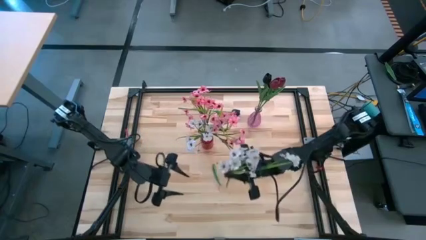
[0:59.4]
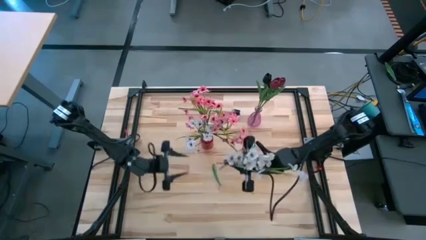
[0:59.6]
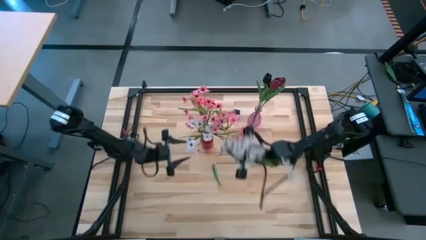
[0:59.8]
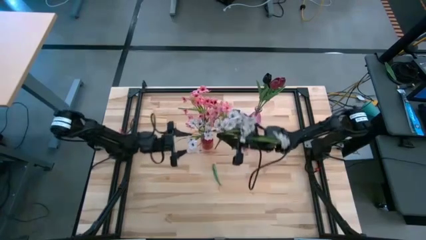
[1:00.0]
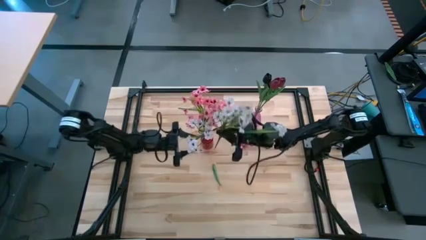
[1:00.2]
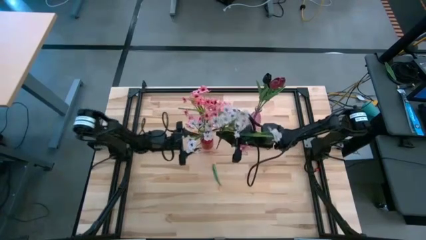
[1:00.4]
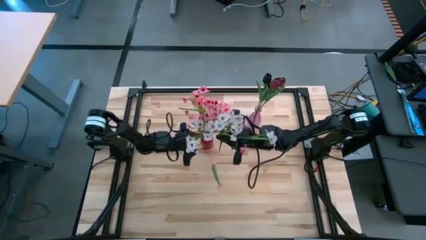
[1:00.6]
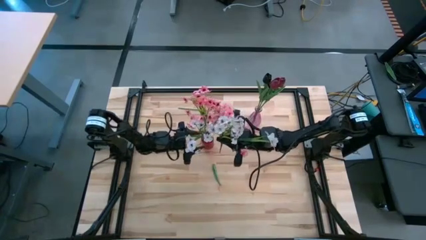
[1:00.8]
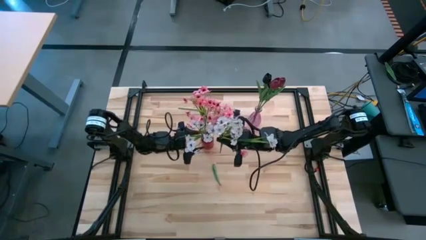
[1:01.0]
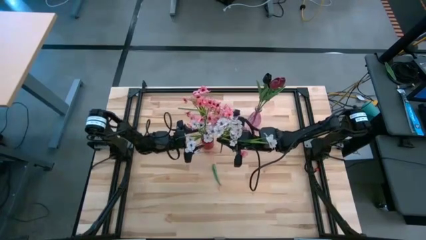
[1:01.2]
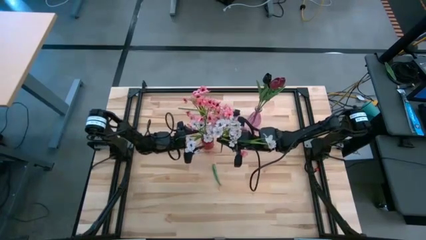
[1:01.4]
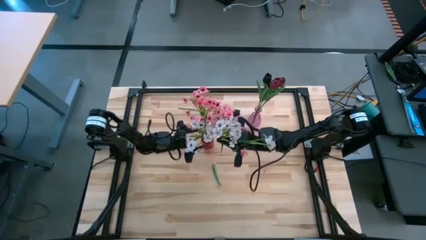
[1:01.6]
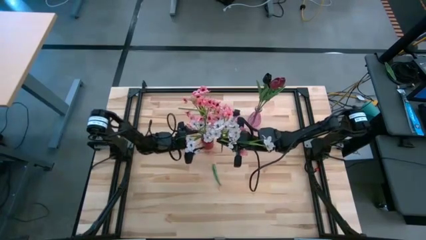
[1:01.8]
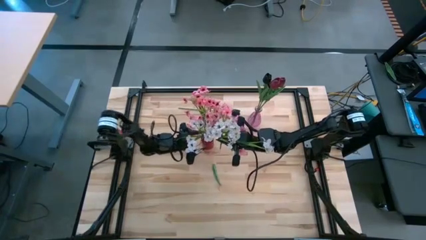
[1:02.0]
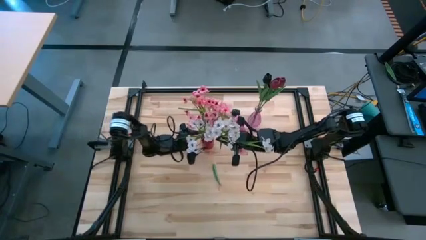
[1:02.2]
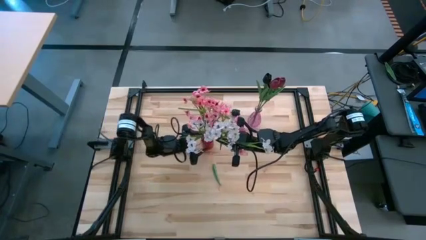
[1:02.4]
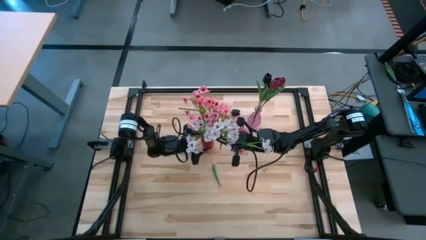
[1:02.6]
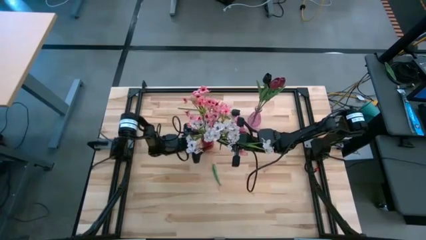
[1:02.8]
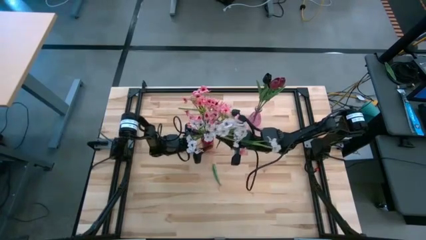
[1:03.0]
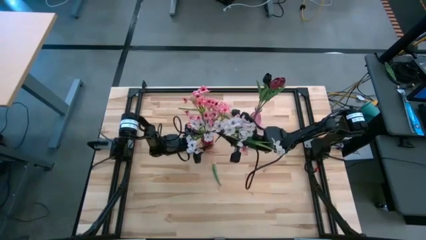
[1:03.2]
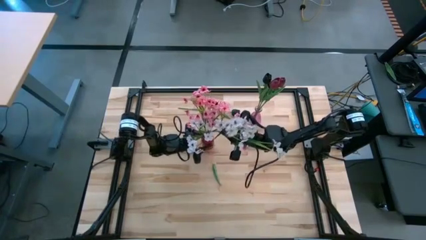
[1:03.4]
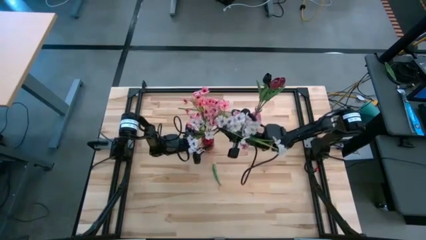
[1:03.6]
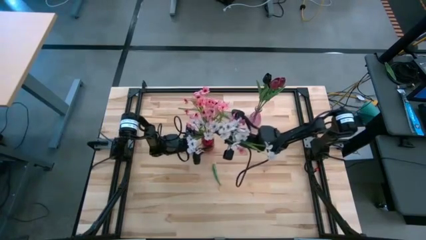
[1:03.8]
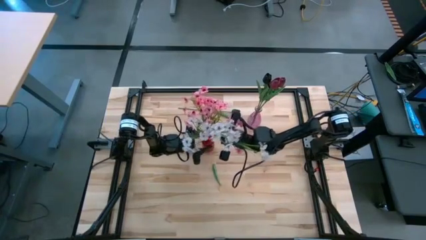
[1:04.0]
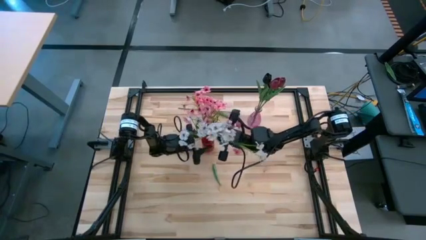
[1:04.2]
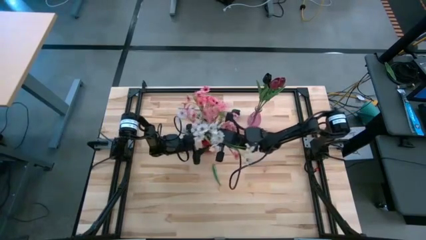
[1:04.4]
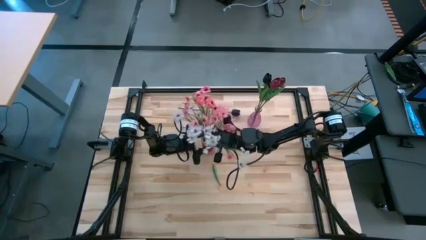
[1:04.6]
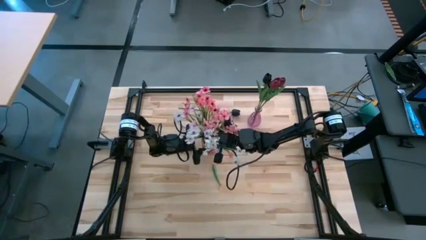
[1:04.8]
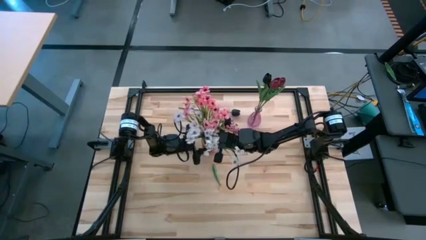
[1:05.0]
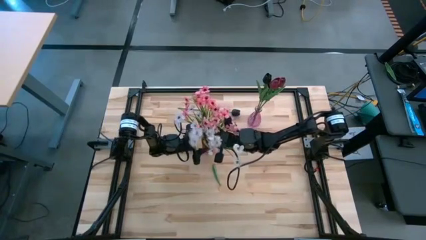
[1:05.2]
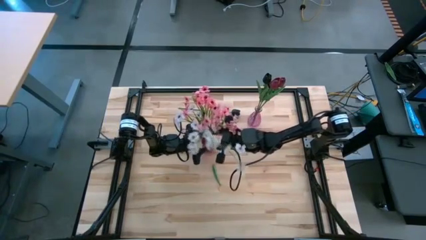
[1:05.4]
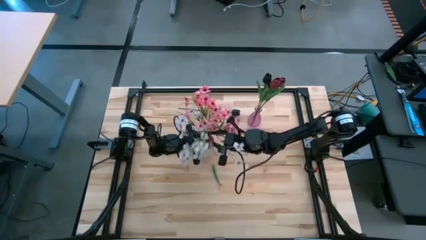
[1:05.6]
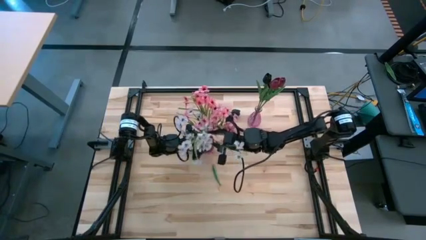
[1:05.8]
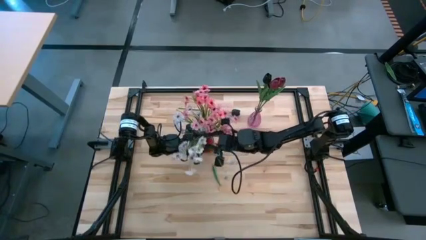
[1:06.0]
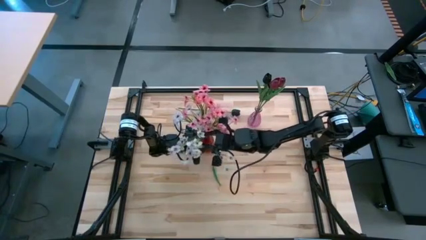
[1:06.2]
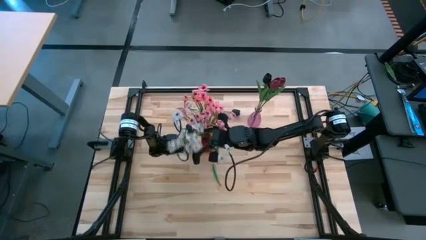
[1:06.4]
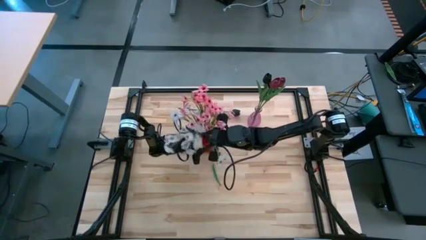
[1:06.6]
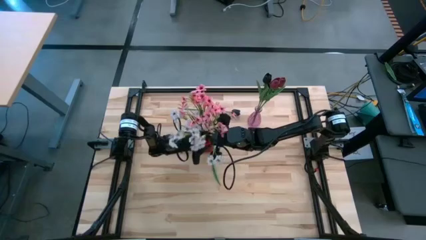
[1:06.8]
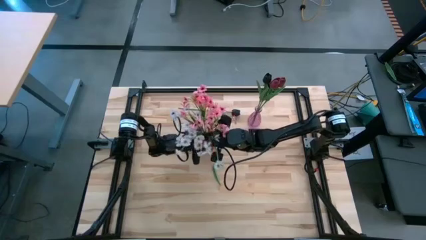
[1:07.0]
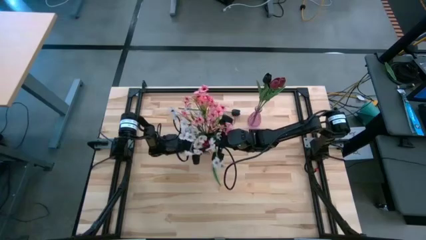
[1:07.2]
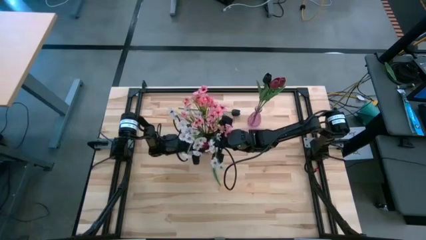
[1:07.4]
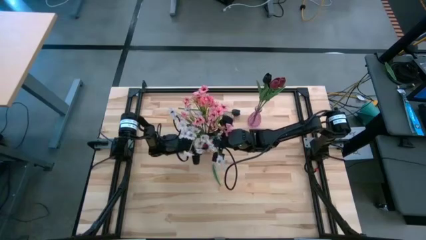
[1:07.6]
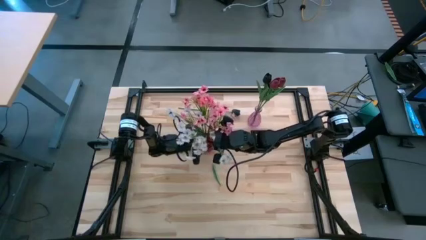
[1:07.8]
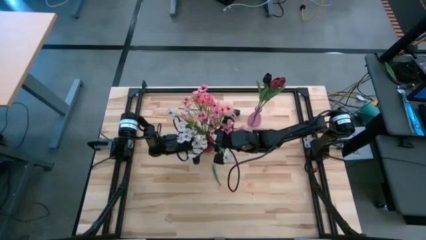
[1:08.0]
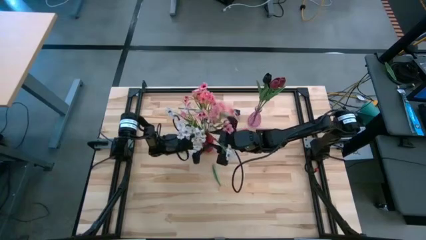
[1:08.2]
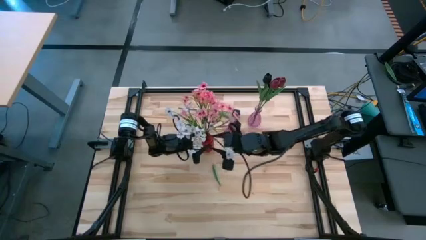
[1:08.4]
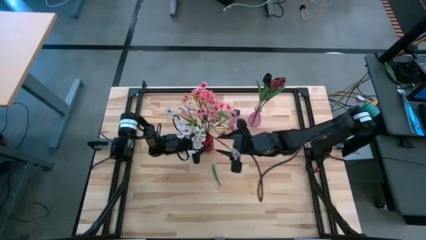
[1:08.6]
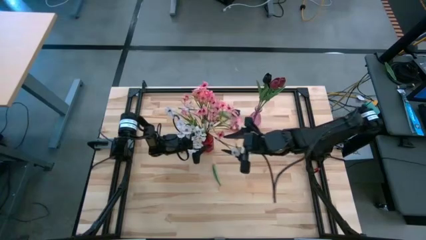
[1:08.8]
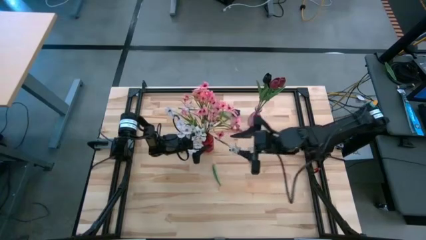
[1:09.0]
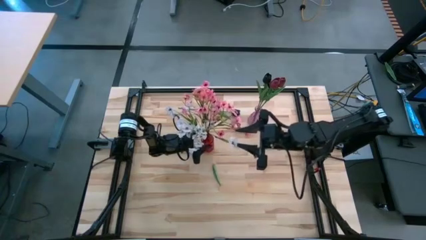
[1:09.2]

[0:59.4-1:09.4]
Task: Sort flowers into vase by color
Put the white flowers into the red vase

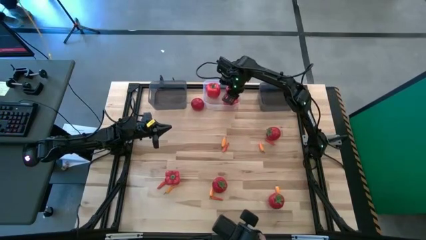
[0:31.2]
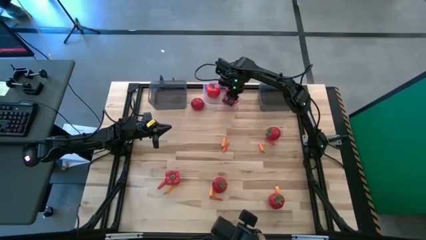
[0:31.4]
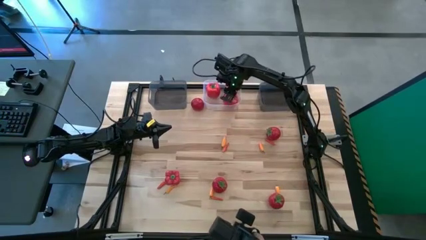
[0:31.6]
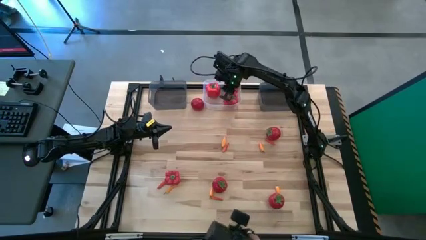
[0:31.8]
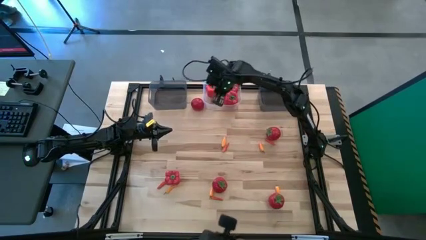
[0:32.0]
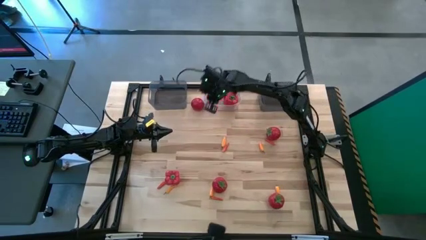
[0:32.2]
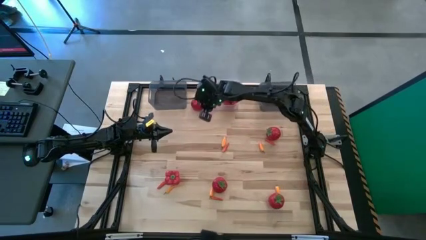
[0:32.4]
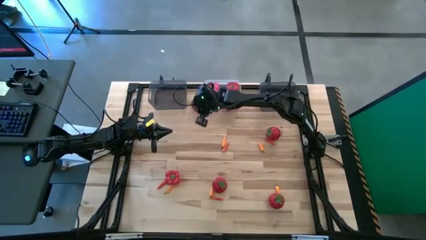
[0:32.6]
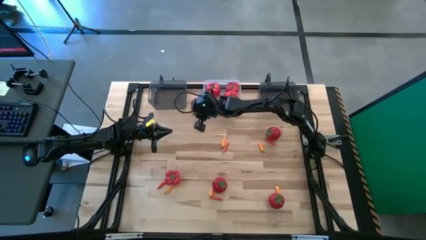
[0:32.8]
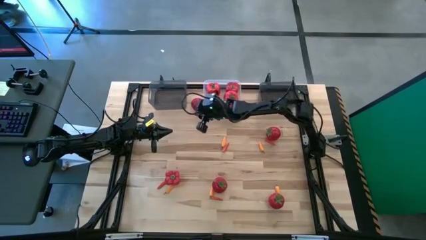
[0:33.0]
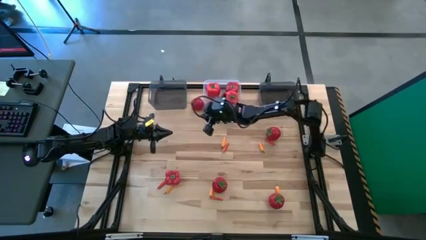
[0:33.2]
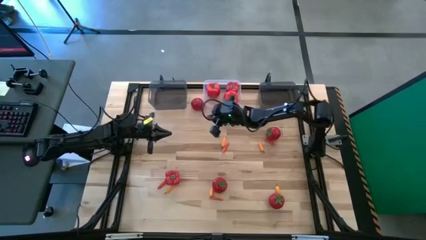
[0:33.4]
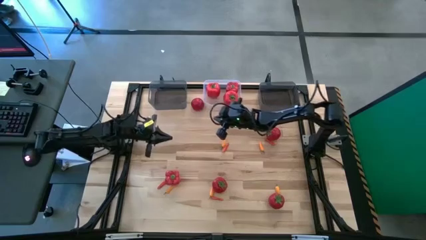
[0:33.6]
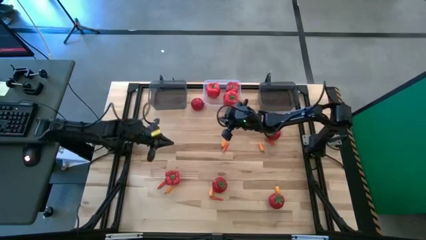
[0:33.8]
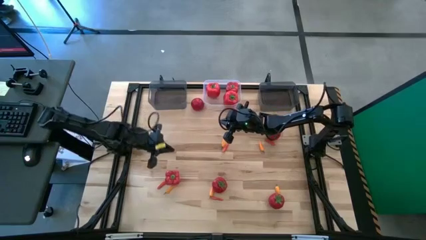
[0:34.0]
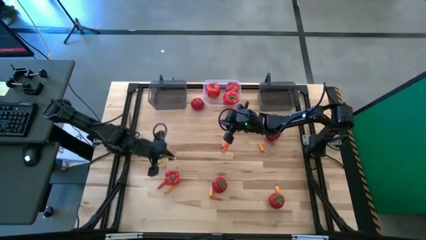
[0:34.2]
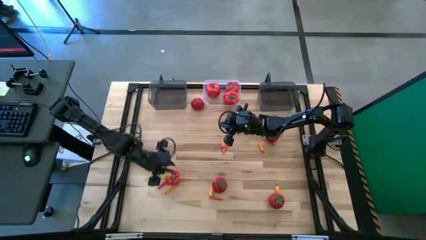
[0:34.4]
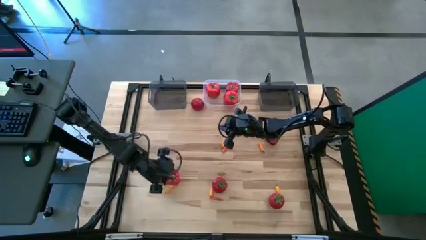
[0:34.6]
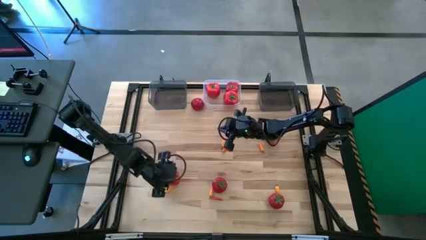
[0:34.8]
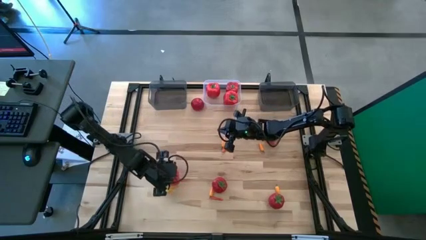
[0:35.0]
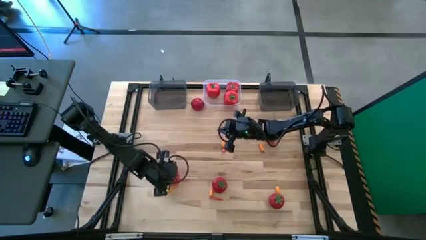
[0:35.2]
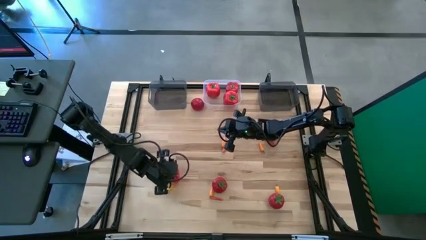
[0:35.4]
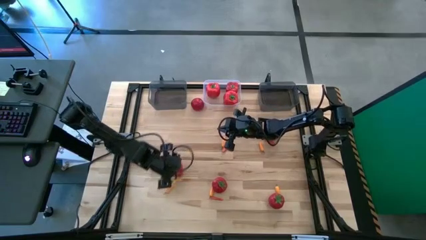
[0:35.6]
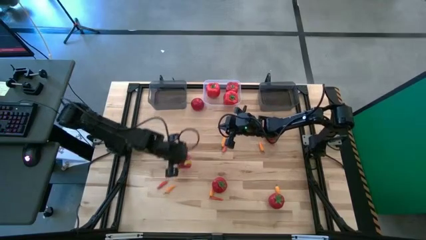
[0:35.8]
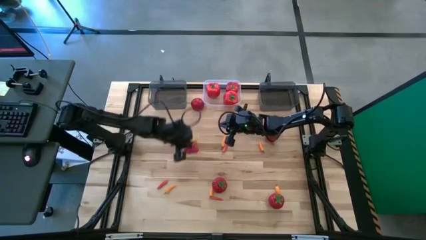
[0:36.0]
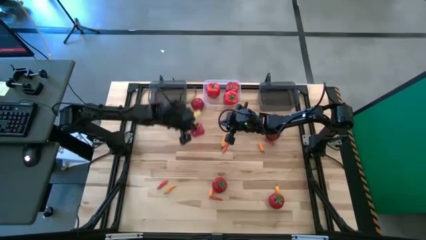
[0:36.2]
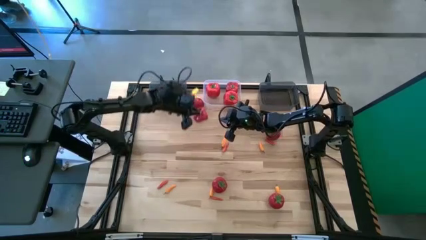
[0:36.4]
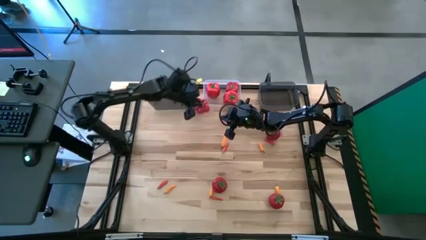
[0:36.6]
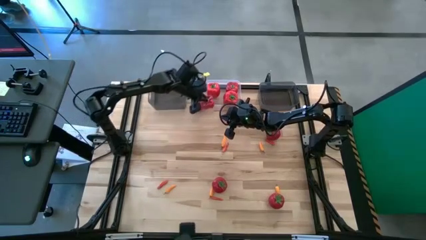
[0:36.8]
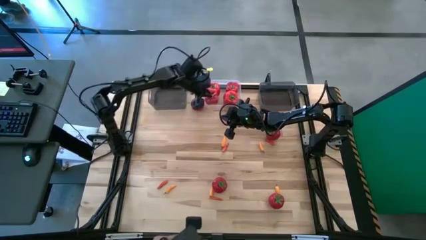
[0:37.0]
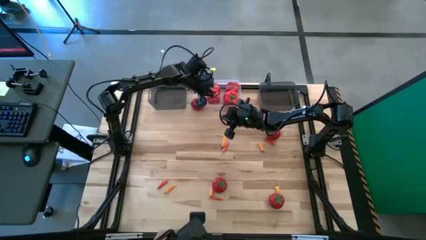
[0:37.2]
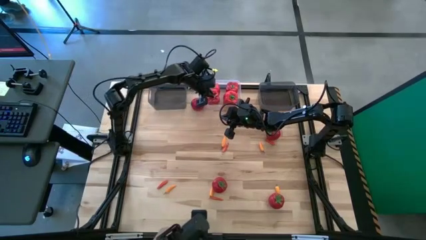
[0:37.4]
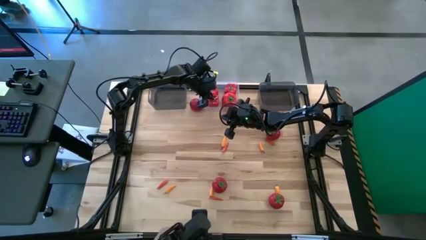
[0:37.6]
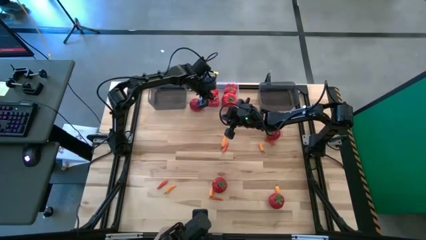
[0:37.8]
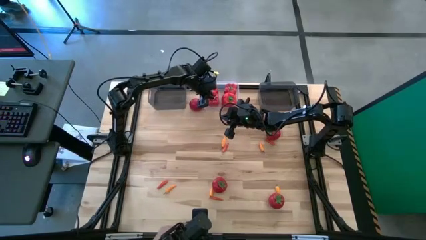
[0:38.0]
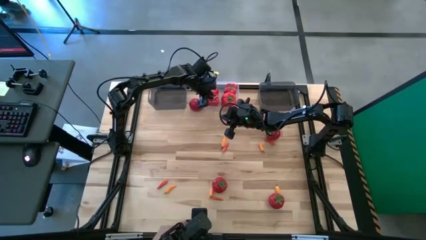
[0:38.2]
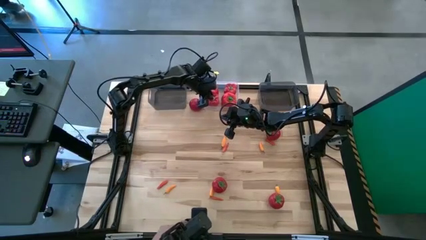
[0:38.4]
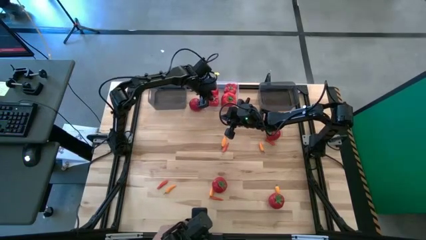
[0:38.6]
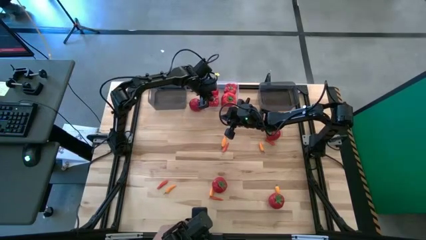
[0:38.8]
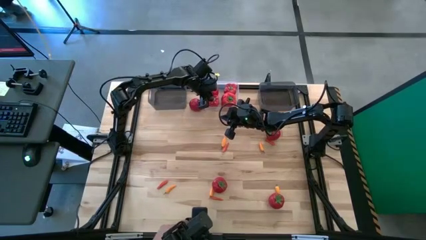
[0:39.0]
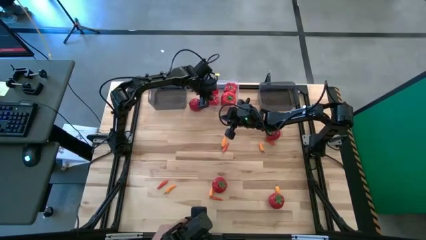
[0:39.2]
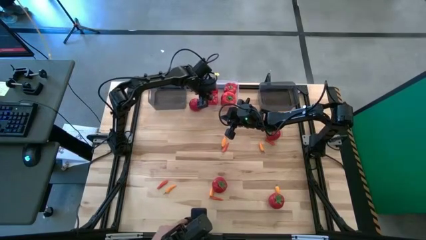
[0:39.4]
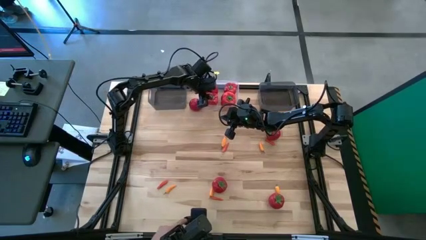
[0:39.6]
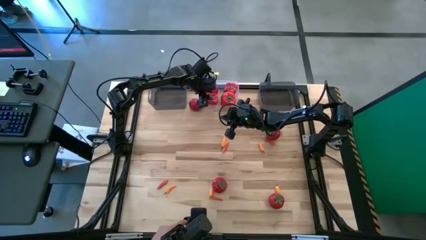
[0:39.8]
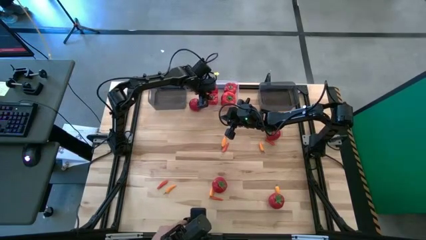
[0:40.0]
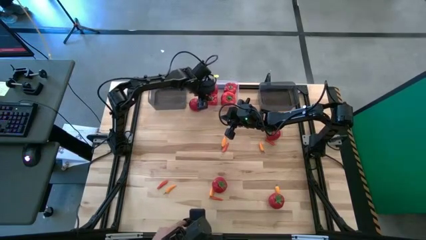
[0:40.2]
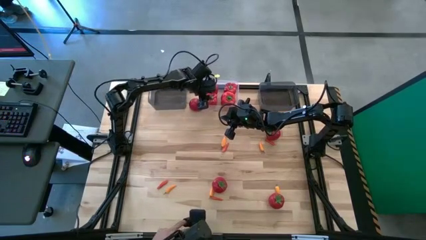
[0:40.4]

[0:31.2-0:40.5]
Task: Sort produce into baskets
Put the red bell pepper into the transparent bin
